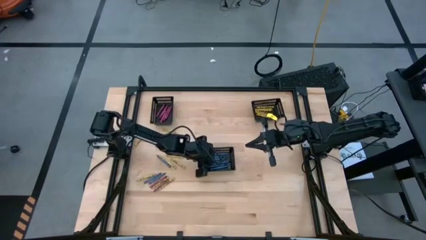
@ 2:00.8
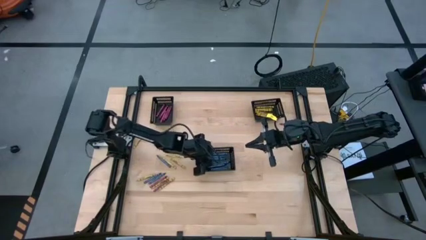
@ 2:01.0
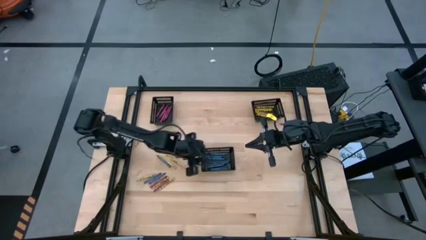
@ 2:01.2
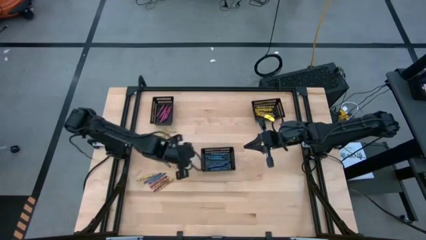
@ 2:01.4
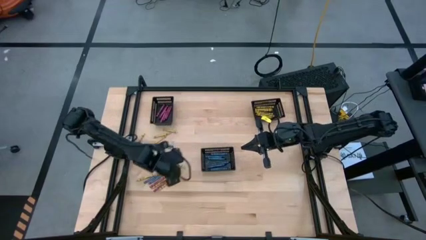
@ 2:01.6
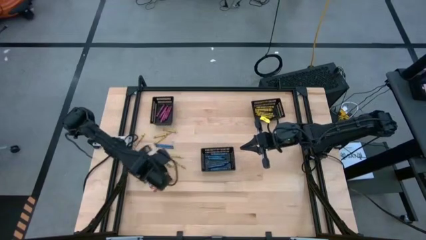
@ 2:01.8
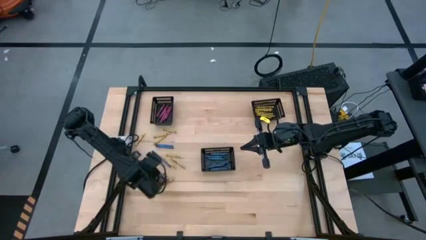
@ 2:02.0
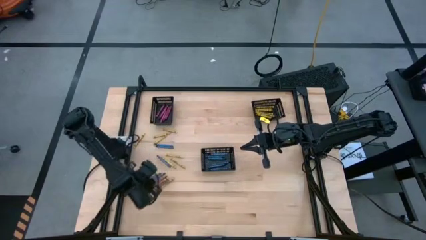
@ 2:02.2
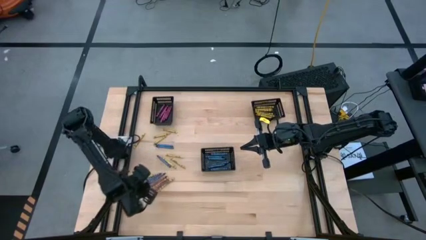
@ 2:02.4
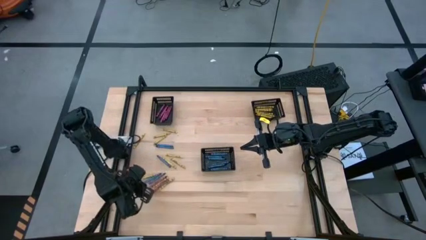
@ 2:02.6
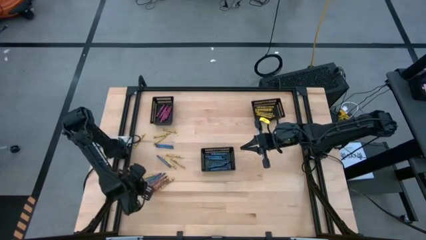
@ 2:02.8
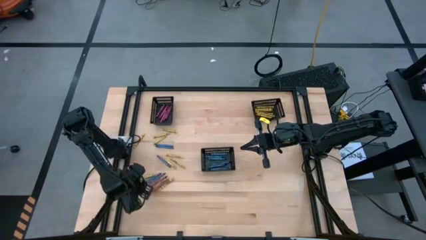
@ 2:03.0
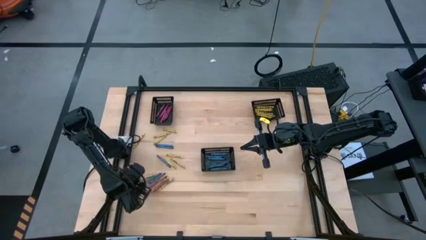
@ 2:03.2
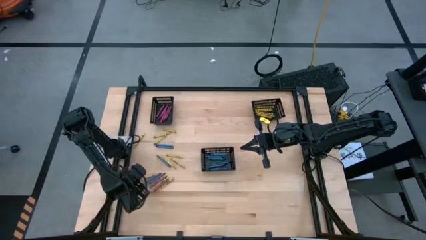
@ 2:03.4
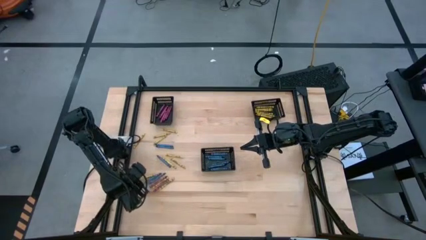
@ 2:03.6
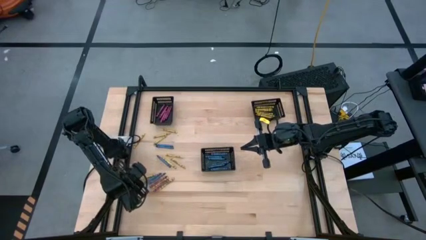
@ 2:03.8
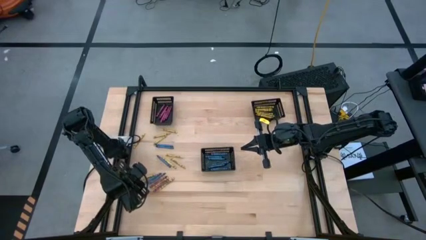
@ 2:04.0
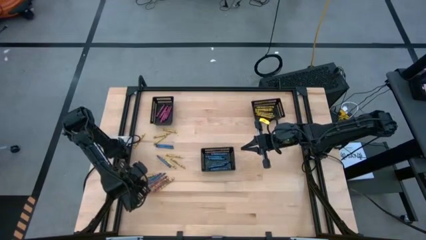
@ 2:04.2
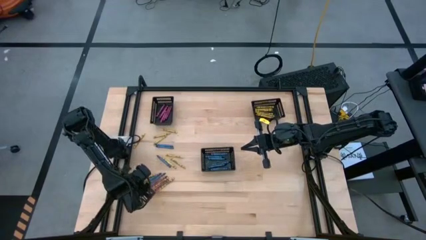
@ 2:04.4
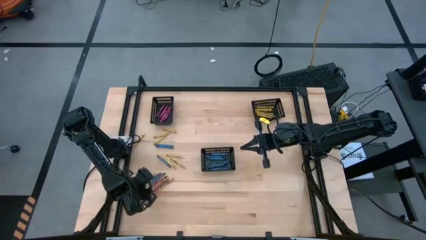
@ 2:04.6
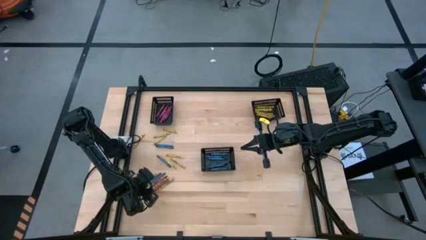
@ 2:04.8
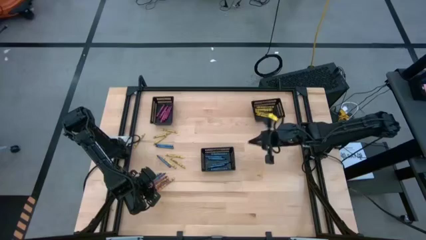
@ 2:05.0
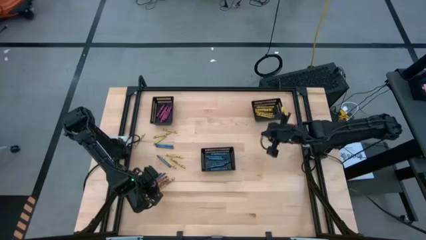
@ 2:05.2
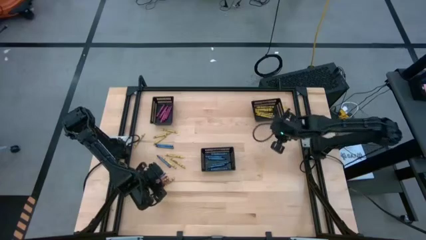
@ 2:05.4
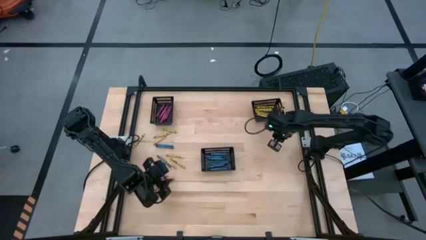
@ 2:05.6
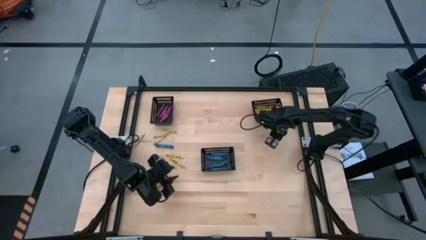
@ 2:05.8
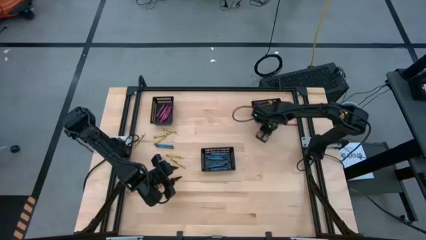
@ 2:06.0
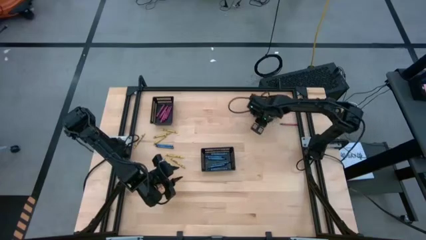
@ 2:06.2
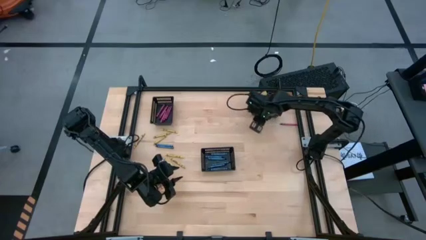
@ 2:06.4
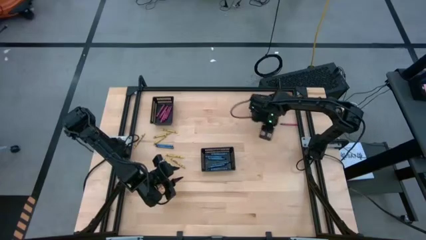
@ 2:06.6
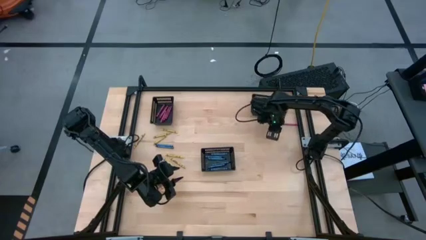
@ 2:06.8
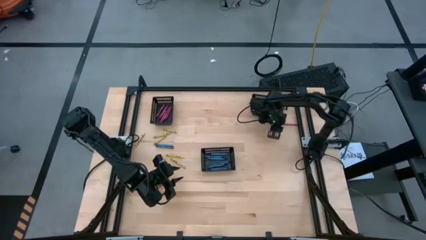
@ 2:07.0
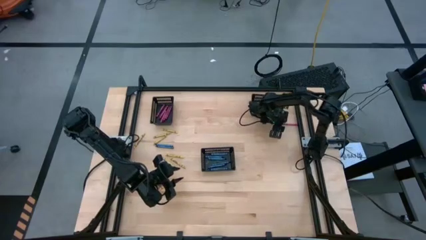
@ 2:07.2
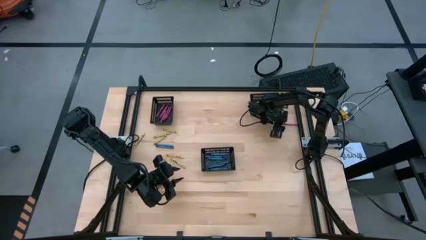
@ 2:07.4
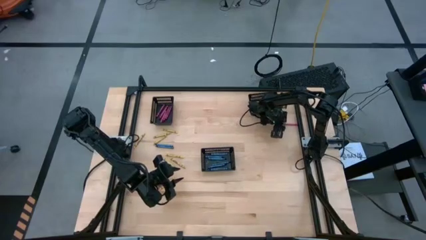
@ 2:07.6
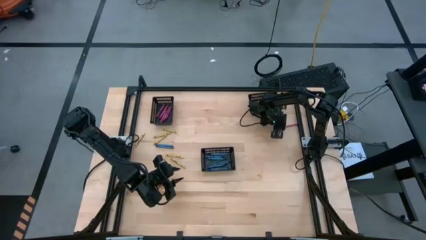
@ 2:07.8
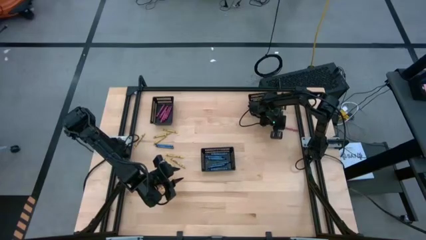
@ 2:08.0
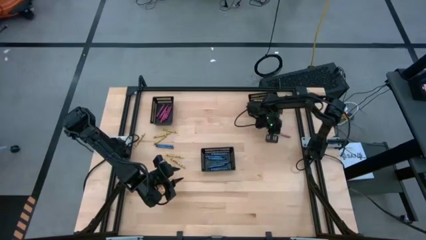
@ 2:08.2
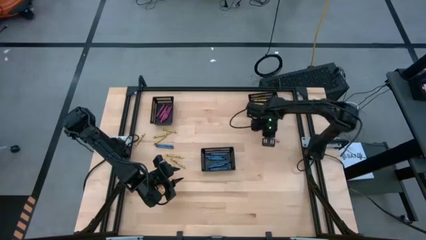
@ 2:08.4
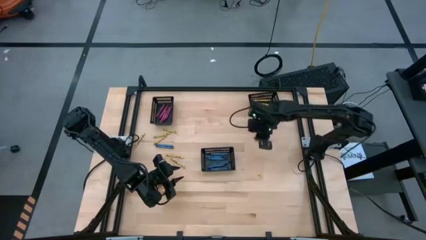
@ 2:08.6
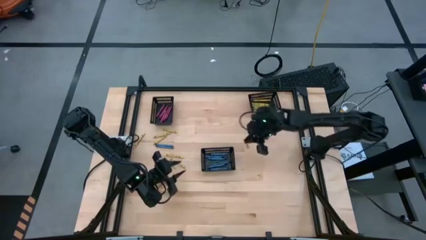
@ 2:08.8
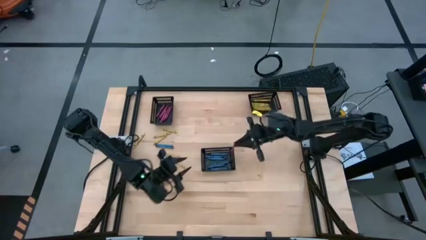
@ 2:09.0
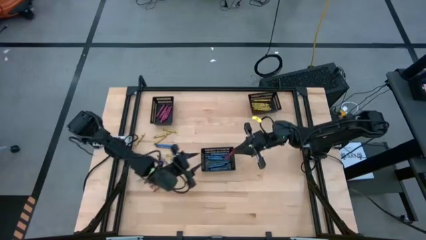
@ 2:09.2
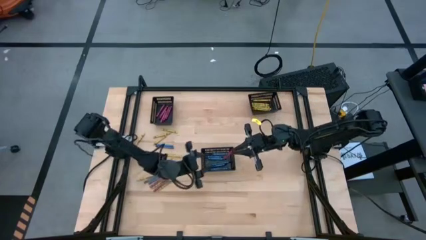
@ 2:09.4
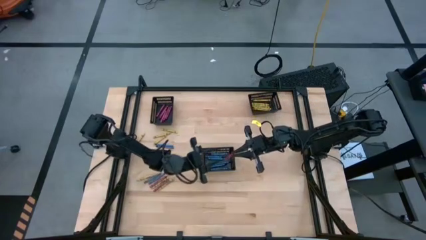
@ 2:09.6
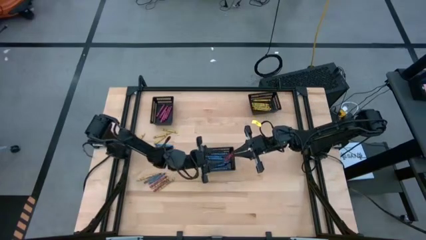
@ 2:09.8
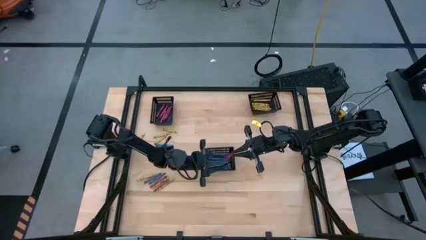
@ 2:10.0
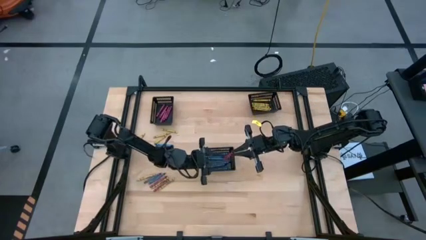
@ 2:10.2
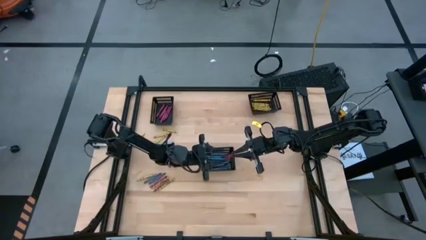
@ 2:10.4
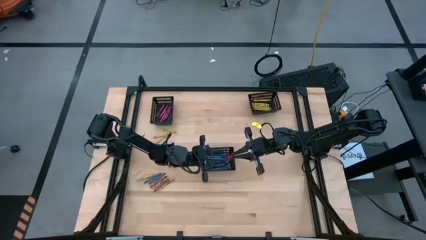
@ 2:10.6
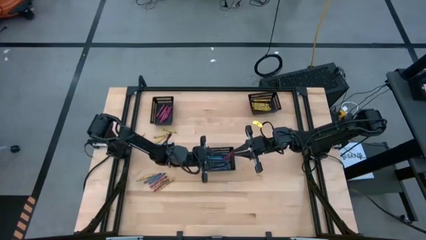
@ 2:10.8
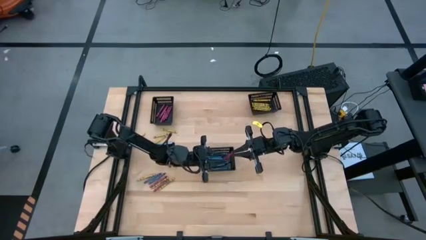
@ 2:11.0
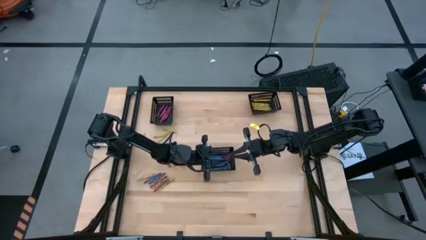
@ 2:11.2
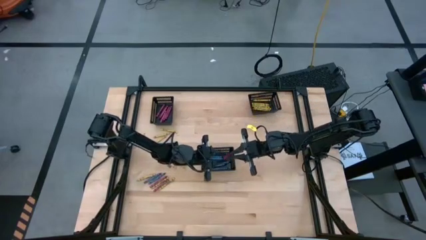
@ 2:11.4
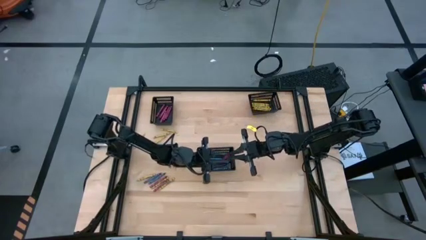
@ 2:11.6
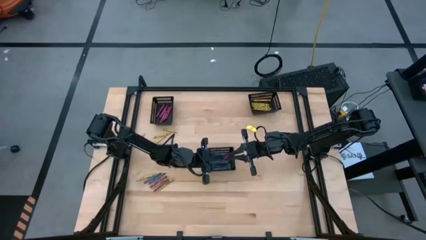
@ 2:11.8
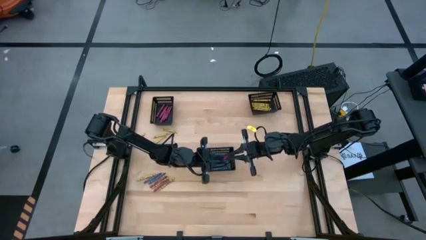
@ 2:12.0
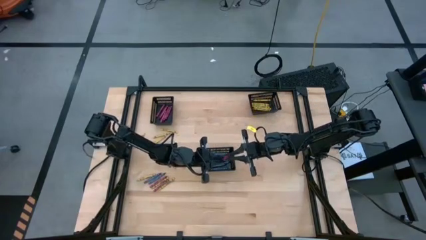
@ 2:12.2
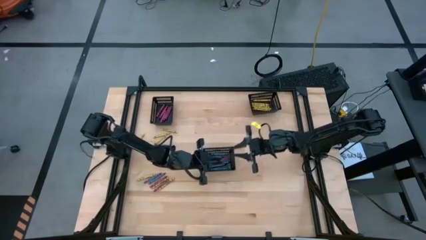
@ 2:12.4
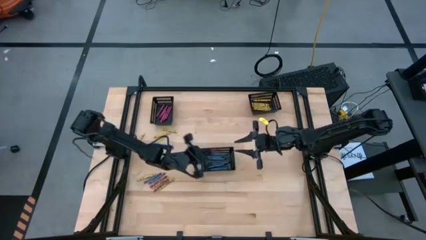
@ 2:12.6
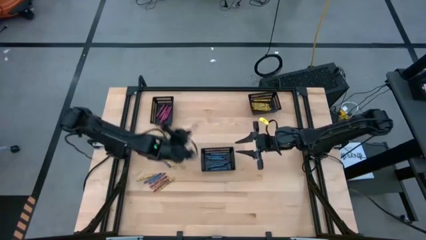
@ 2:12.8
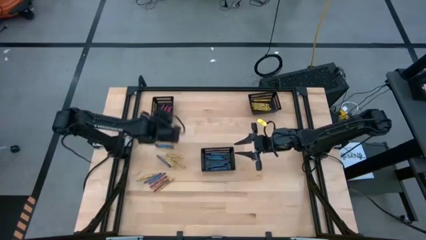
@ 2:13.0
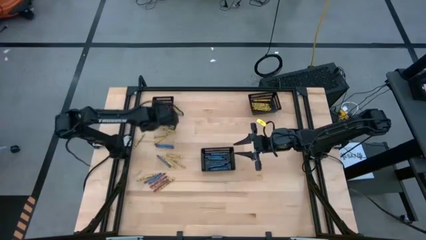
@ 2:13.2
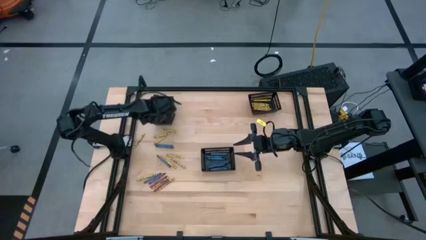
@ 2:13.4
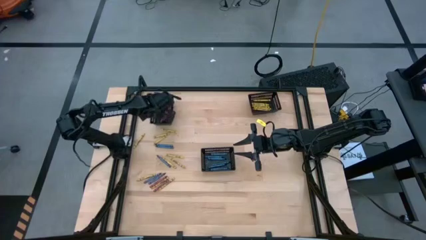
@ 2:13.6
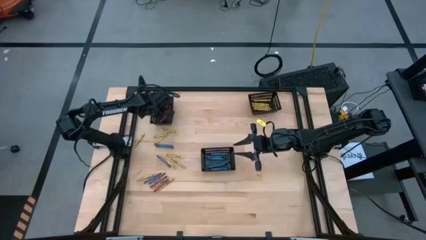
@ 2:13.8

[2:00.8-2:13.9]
Task: Sort crayons
Put the pink crayon into the top left black bin
